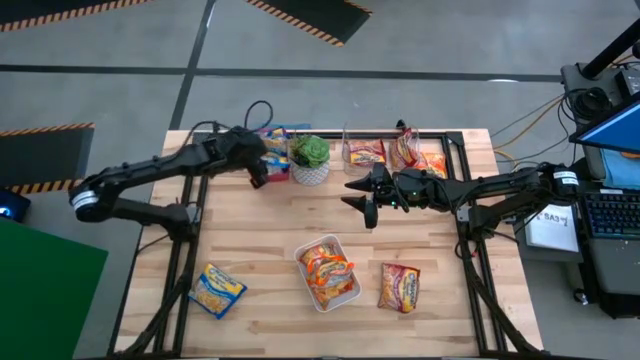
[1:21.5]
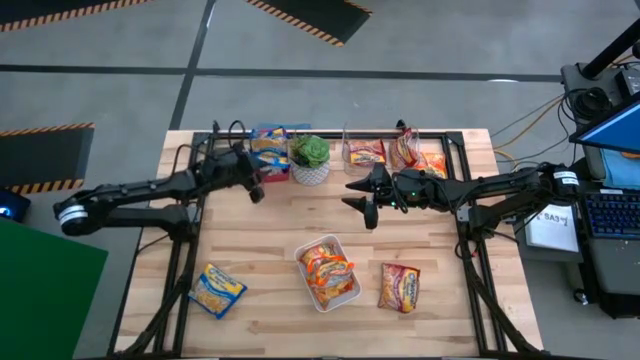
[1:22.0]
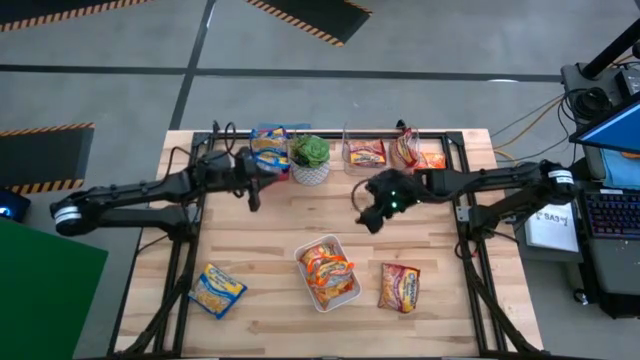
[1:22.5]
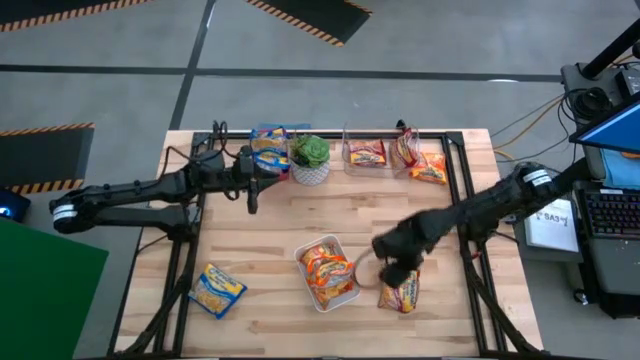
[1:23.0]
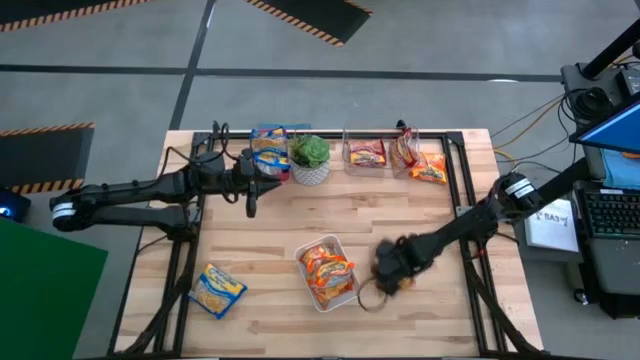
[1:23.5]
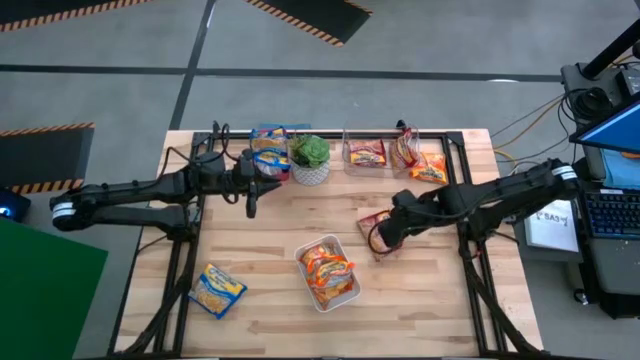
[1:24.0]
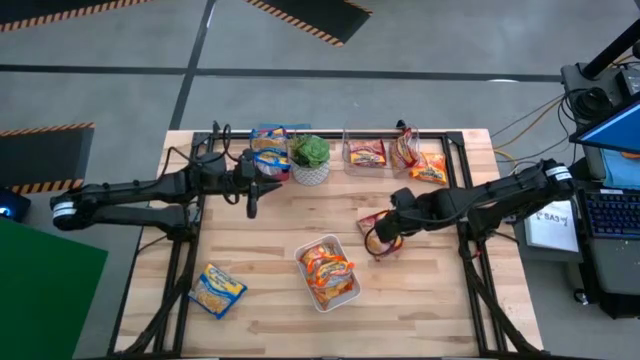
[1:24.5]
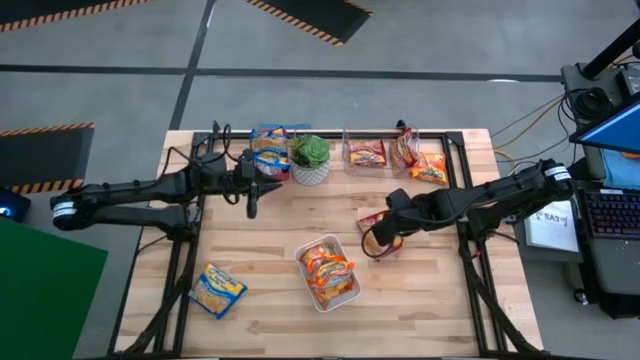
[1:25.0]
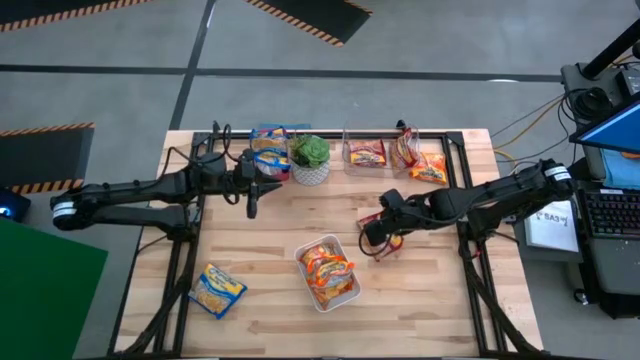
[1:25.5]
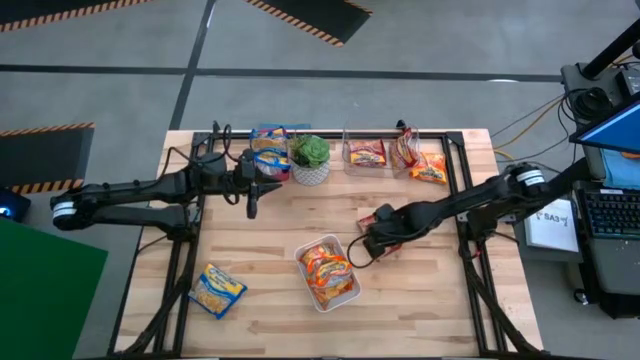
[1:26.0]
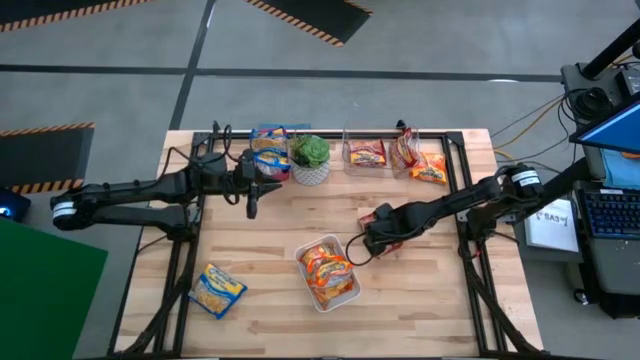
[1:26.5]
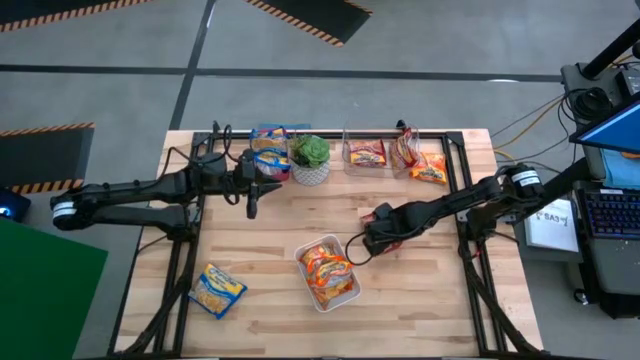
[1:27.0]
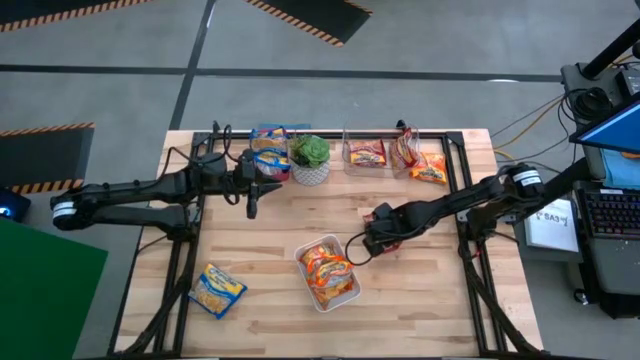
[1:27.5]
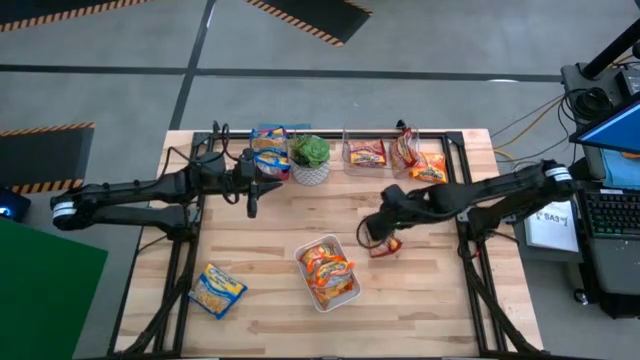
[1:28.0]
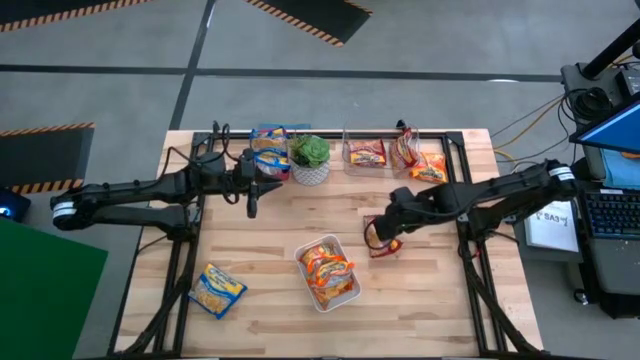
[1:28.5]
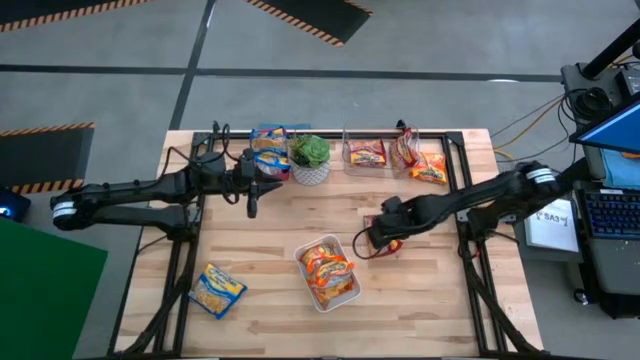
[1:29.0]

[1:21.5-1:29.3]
Task: Sort Maruchan noodles
Put the red noodle pack into the transparent bin

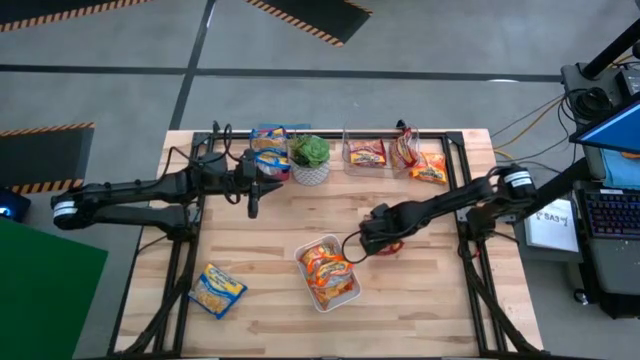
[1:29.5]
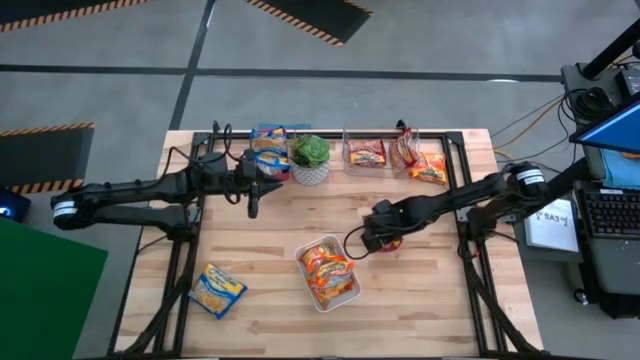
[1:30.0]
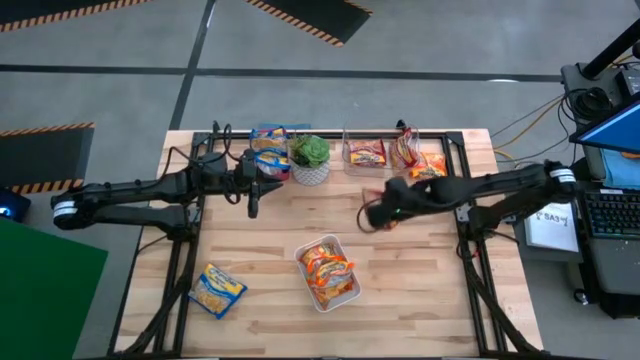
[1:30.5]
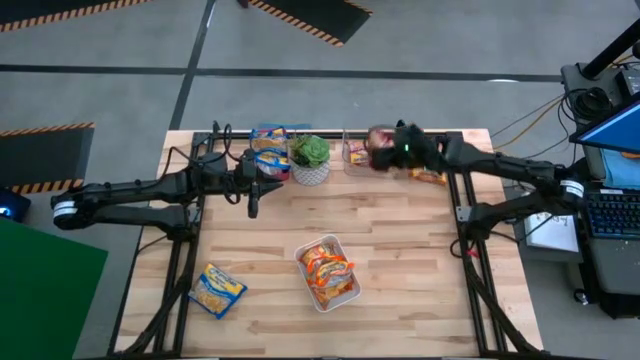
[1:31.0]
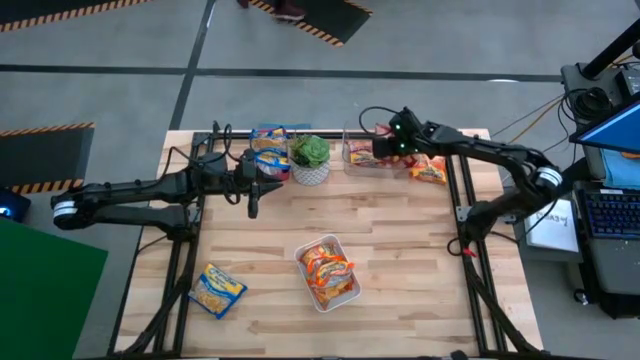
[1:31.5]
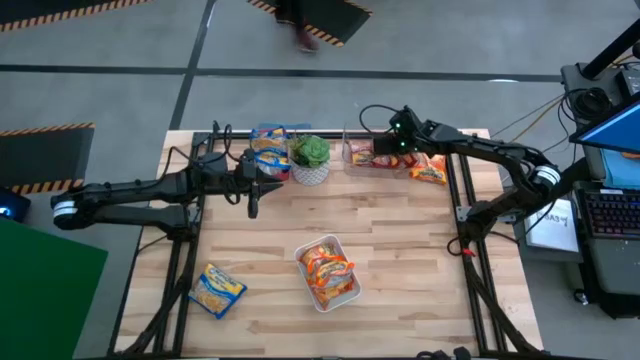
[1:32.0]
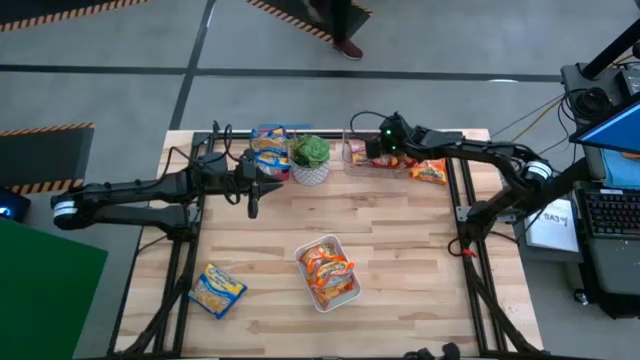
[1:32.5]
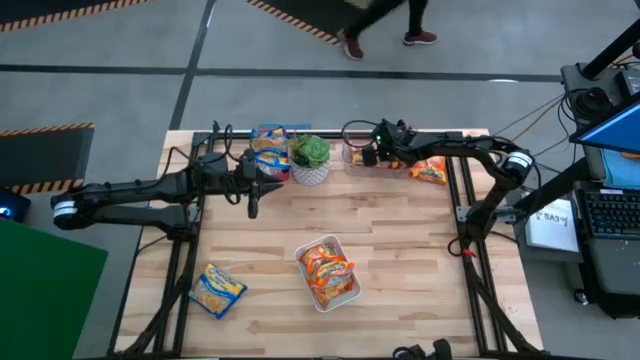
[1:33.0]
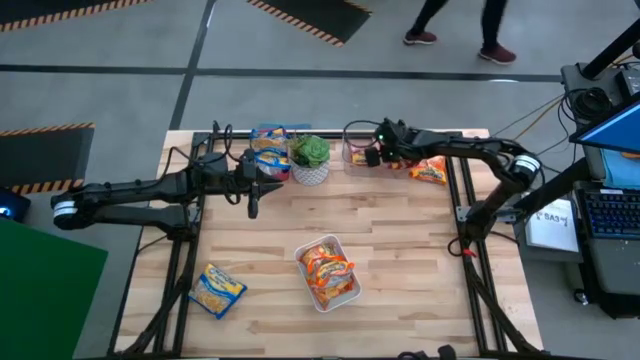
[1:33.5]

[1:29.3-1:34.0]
Put the red noodle pack into the transparent bin

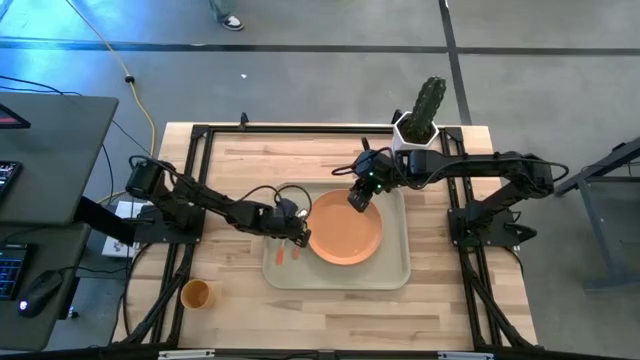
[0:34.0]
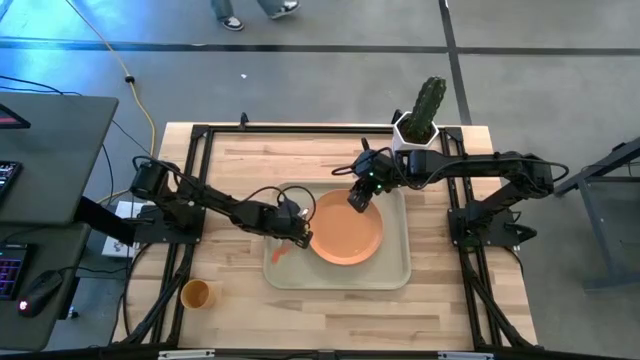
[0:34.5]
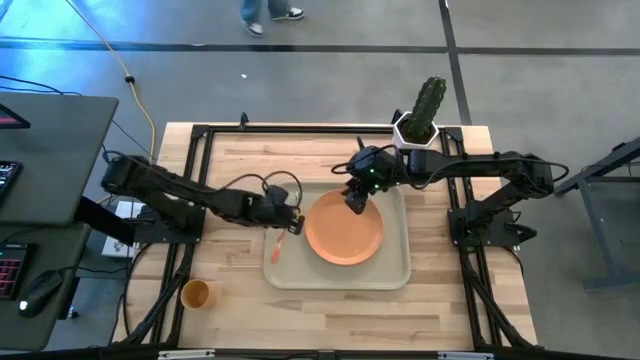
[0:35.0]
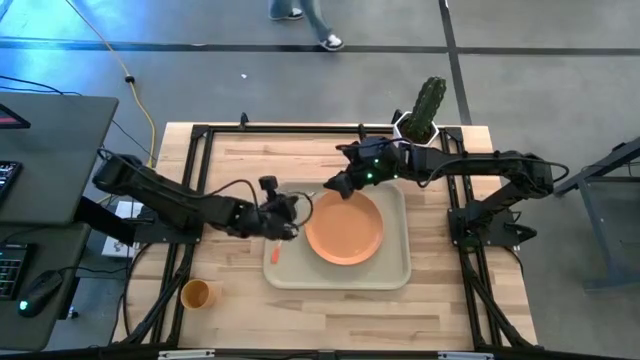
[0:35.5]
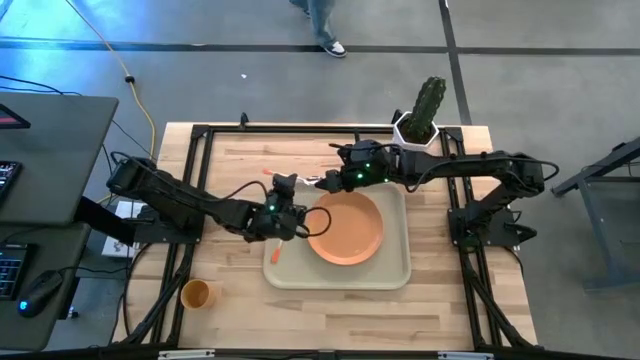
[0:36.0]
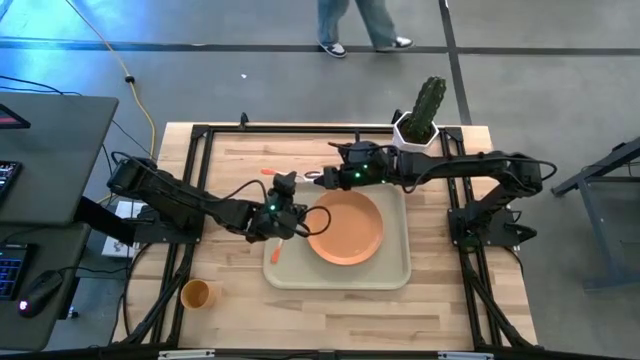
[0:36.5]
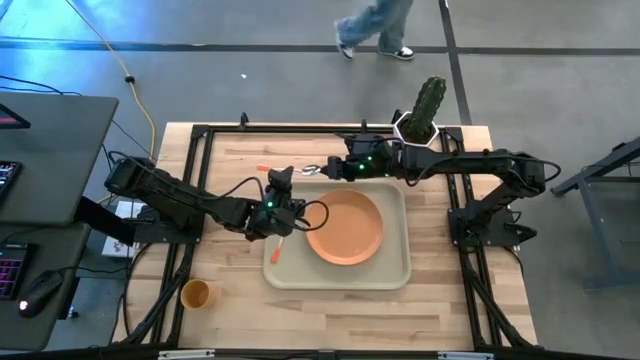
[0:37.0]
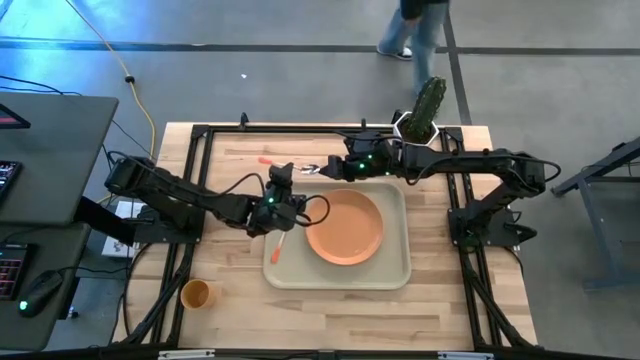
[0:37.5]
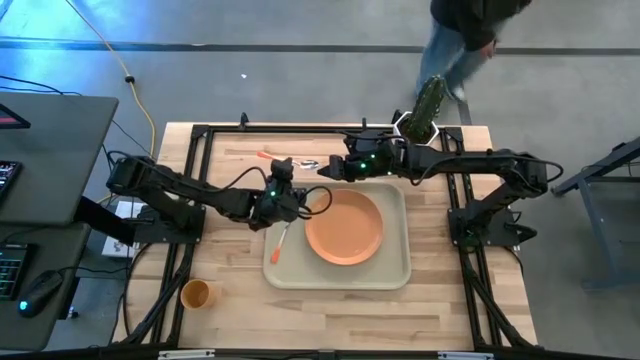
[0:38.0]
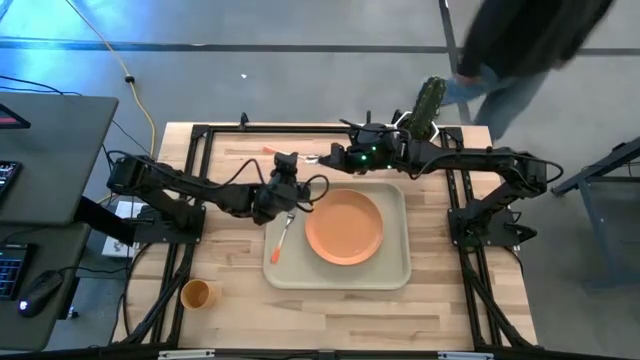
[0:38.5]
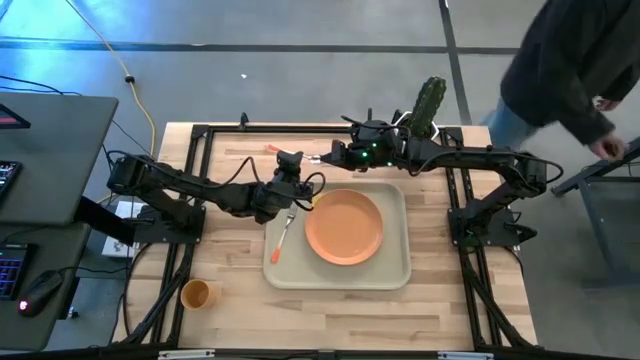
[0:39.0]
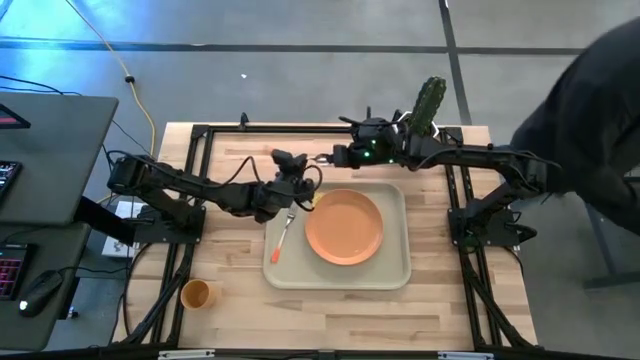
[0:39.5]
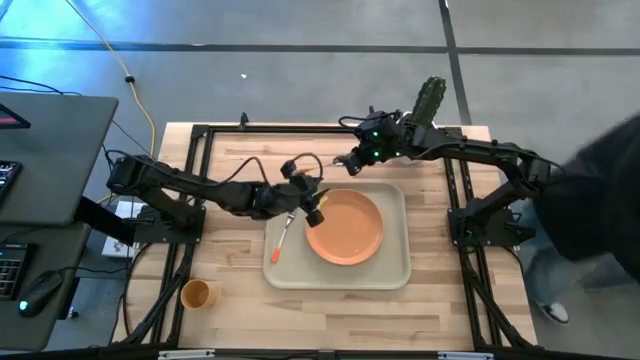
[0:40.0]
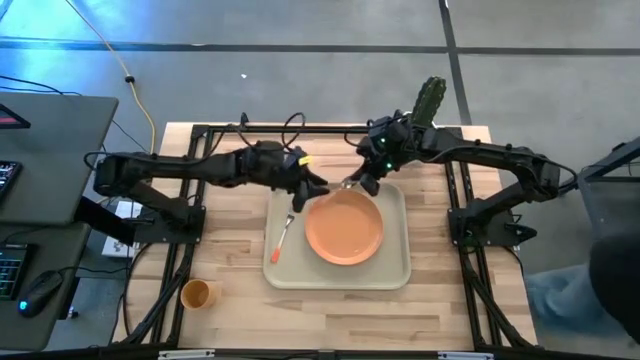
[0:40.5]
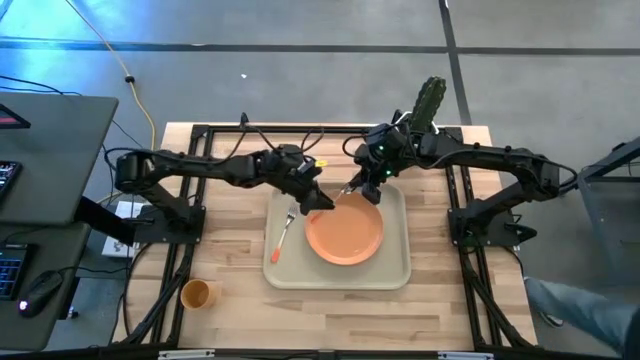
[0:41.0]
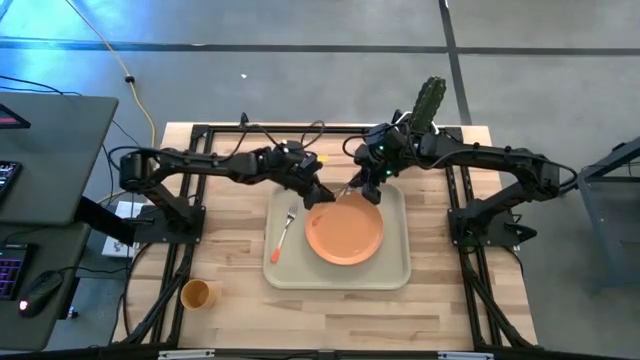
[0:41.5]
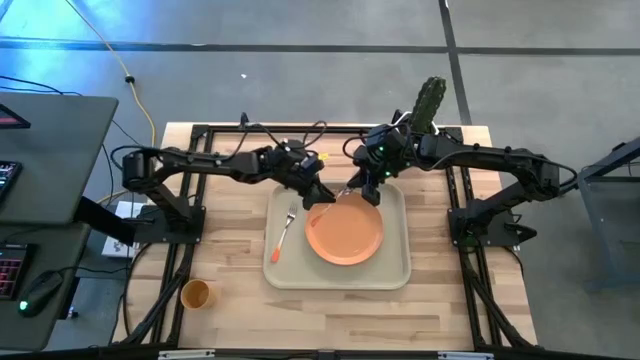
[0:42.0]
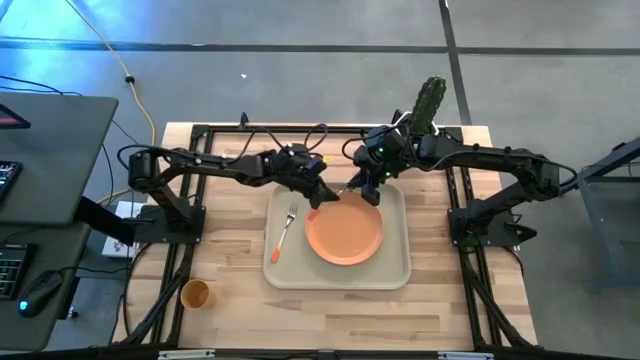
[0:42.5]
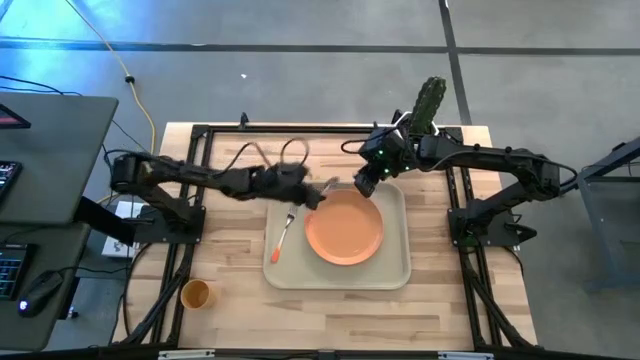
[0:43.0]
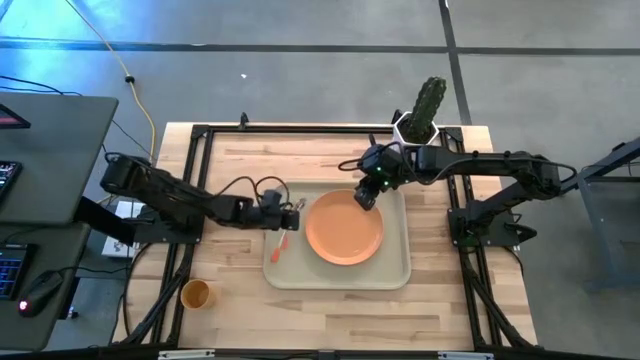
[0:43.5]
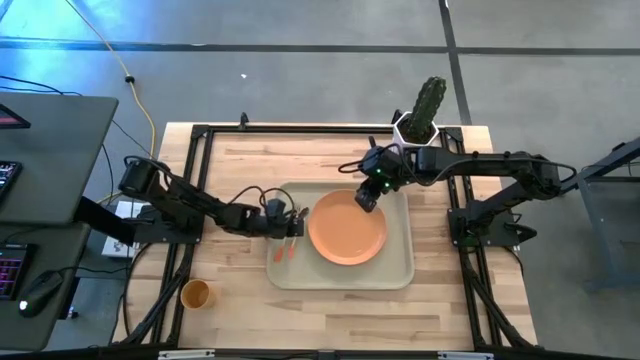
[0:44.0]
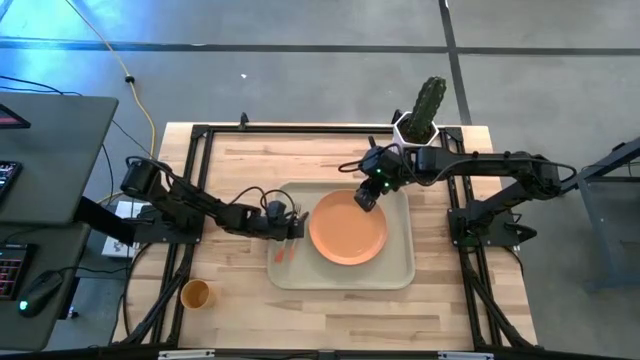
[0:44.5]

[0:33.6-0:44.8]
Task: Pick and place plate/cup/fork/spoon on tray
Put the orange spoon on the light brown serving tray to the left of the orange plate
